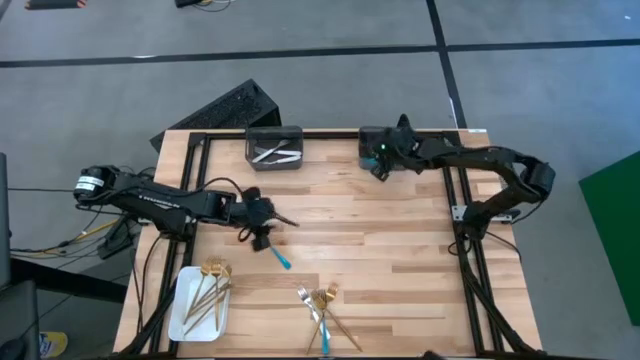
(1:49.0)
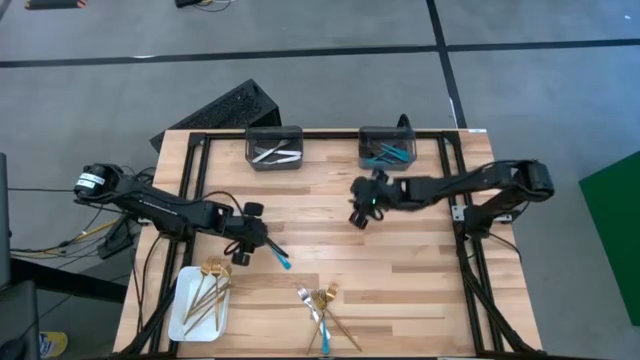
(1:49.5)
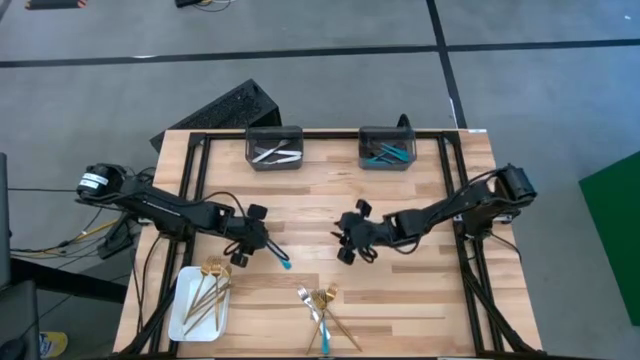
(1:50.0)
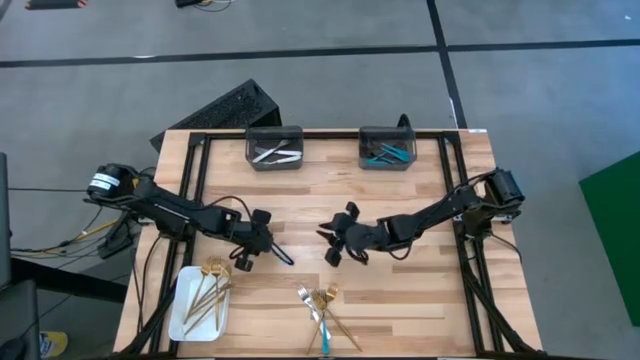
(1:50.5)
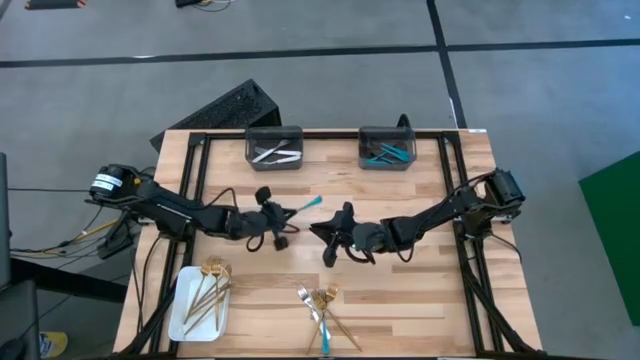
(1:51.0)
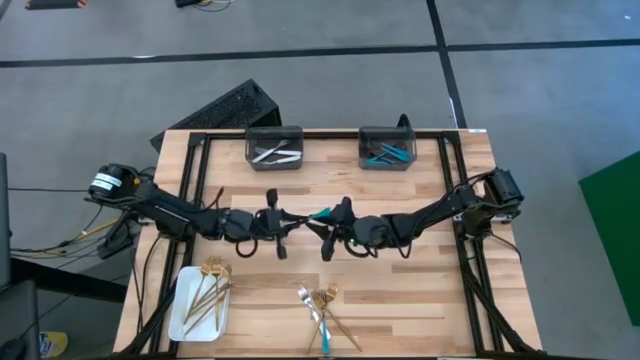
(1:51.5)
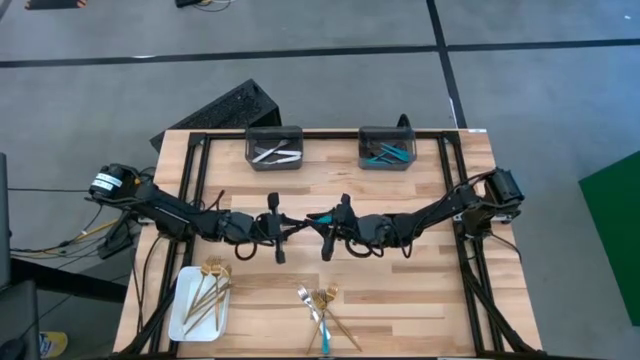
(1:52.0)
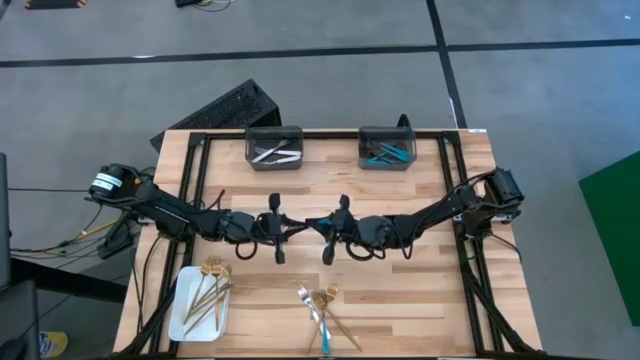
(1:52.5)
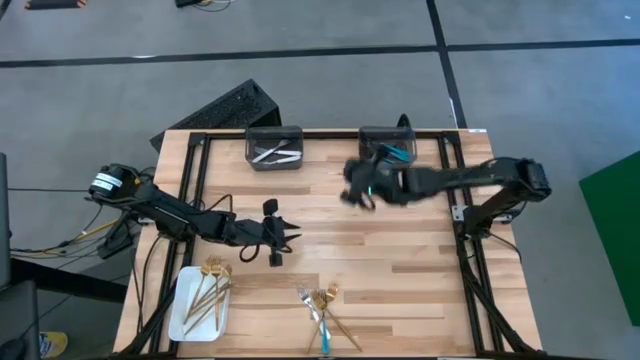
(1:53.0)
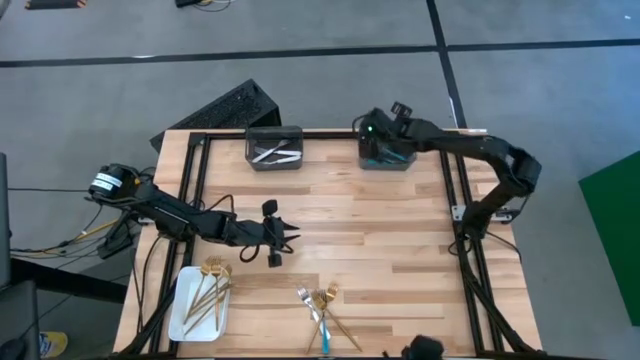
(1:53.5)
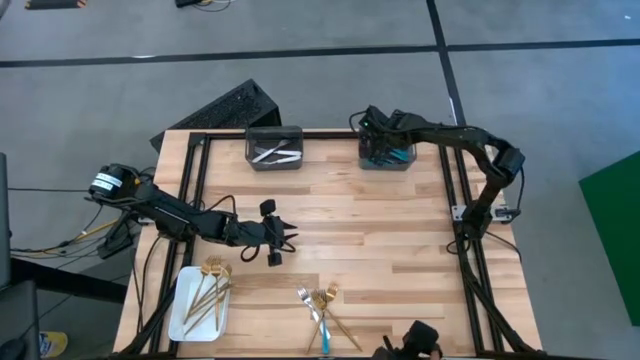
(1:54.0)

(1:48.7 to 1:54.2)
Task: Sort silverware by color (type)
Put the blue fork into the right black bin

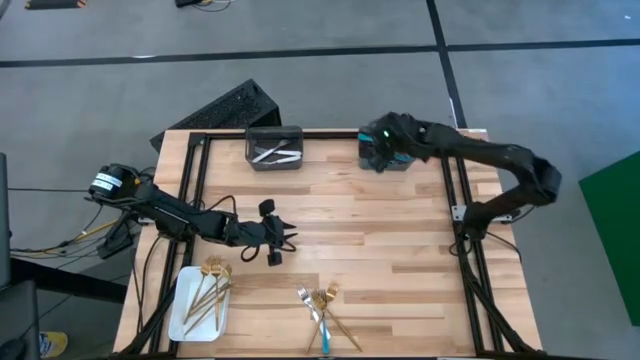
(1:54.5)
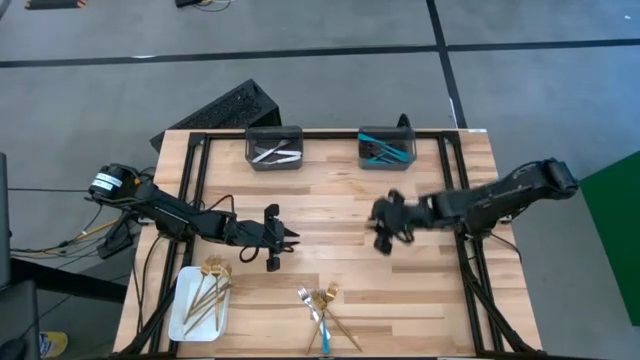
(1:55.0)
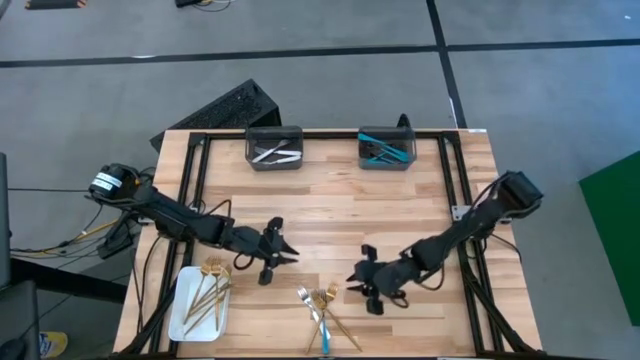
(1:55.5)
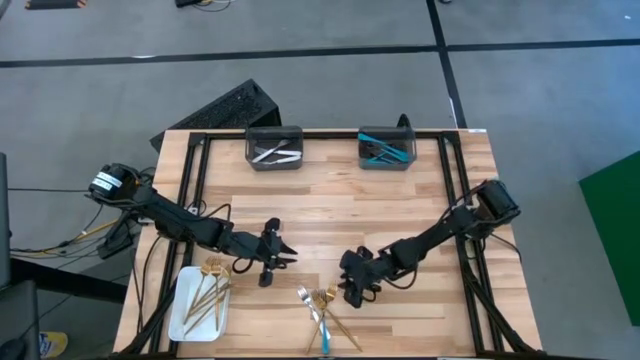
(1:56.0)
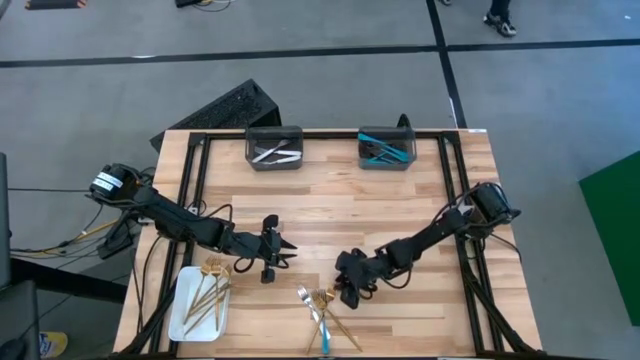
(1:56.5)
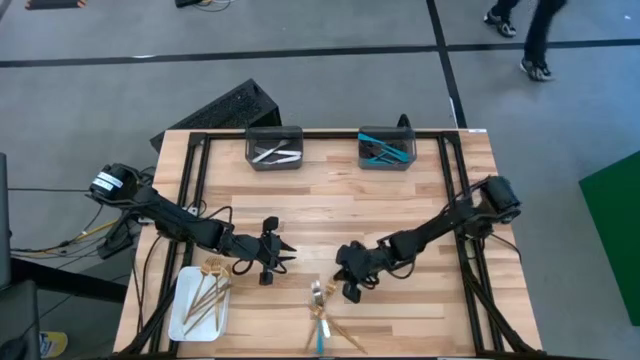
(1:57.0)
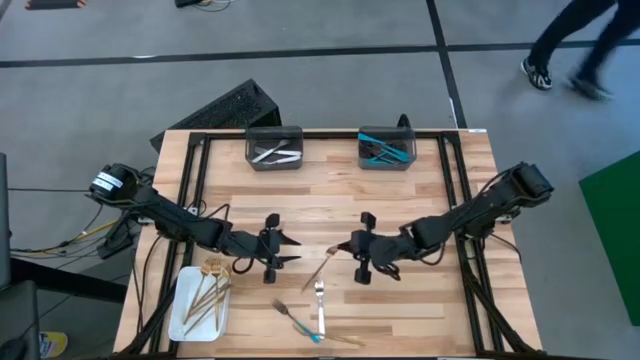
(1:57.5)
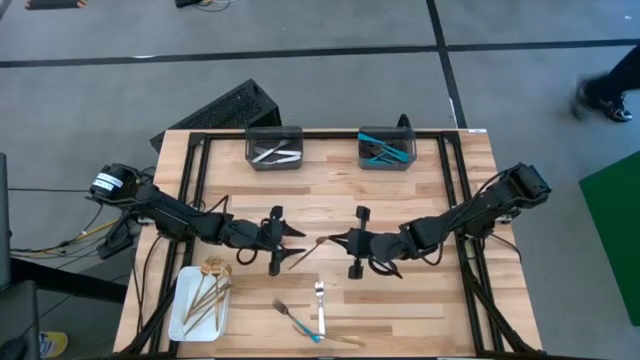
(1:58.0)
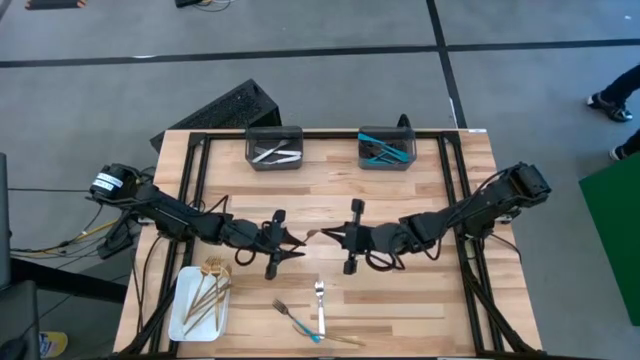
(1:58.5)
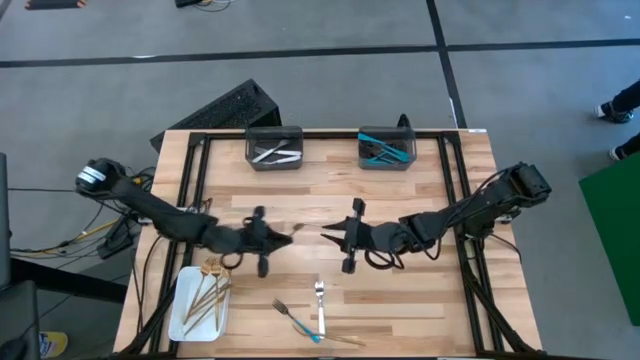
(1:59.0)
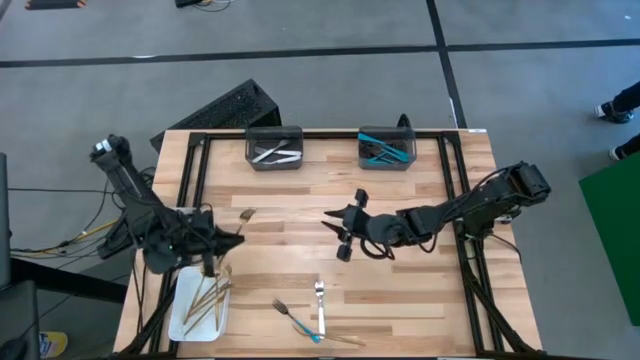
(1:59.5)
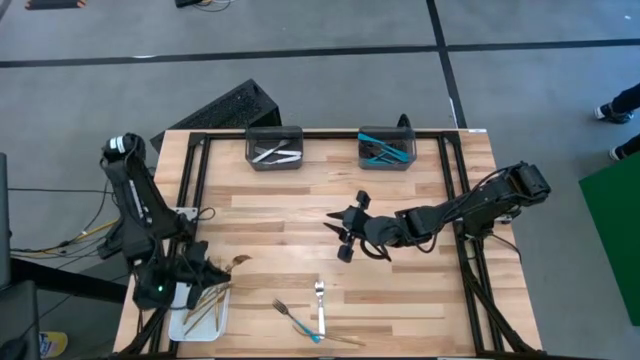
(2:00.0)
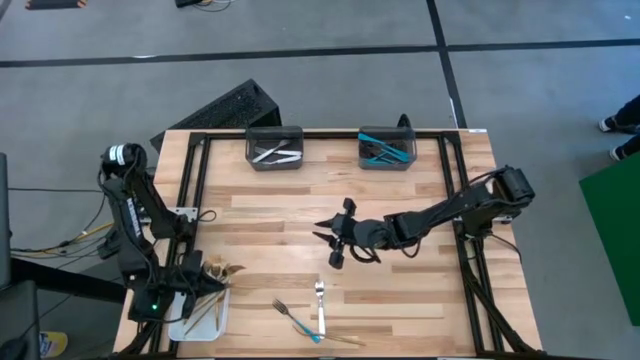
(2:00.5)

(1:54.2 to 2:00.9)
Put the gold fork into the white bin

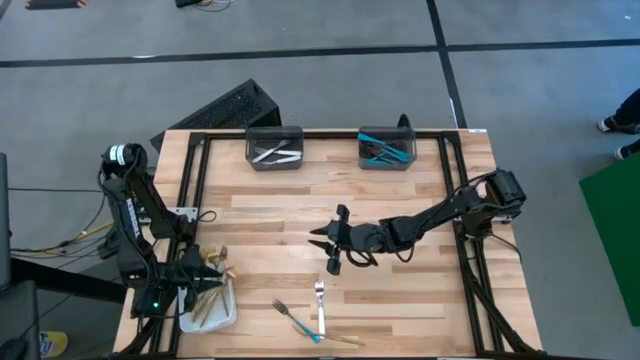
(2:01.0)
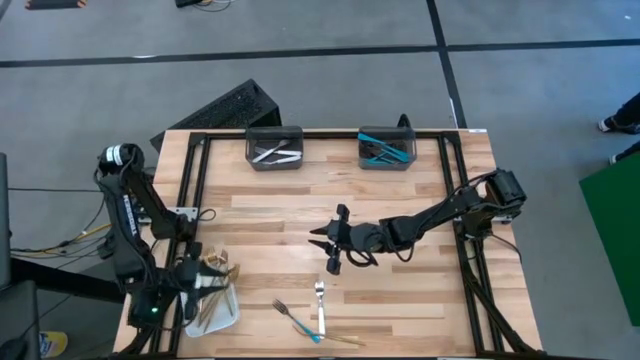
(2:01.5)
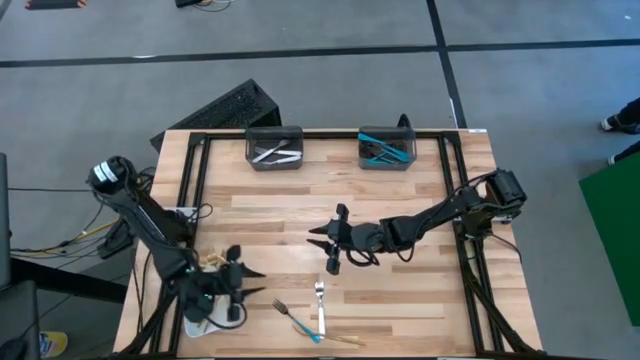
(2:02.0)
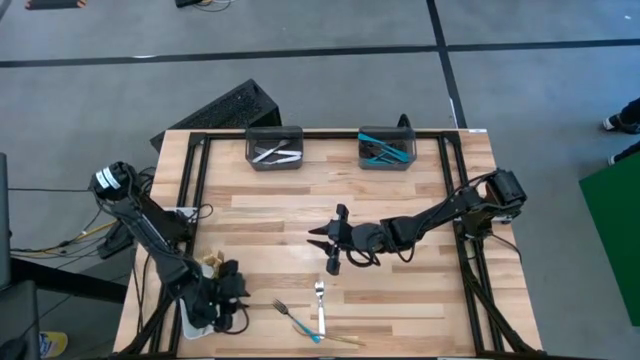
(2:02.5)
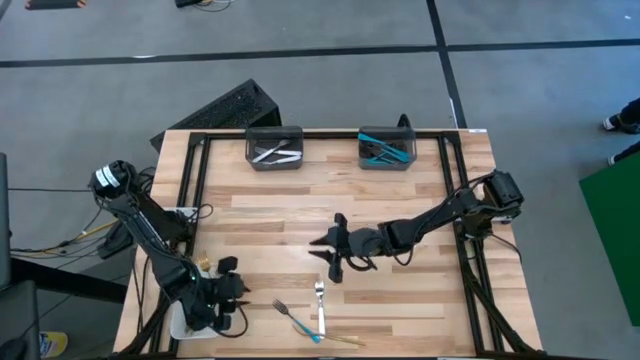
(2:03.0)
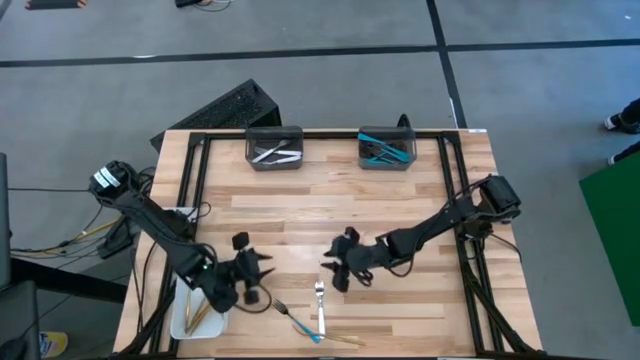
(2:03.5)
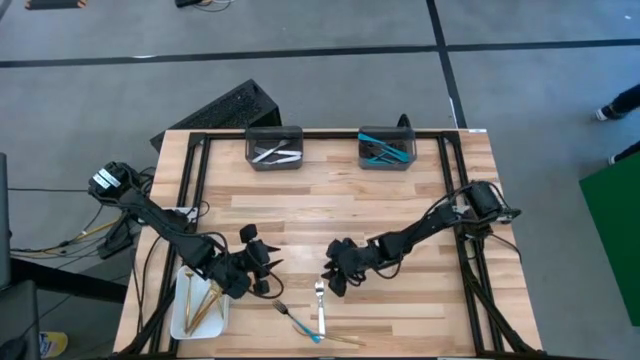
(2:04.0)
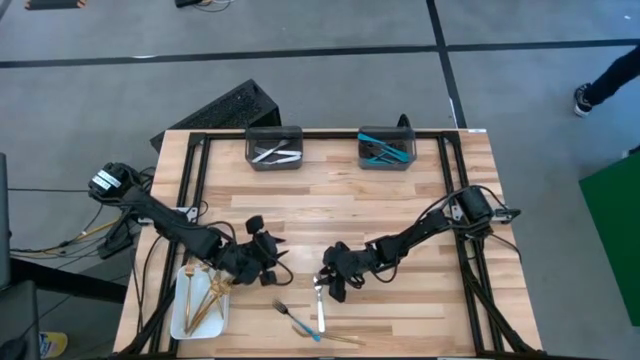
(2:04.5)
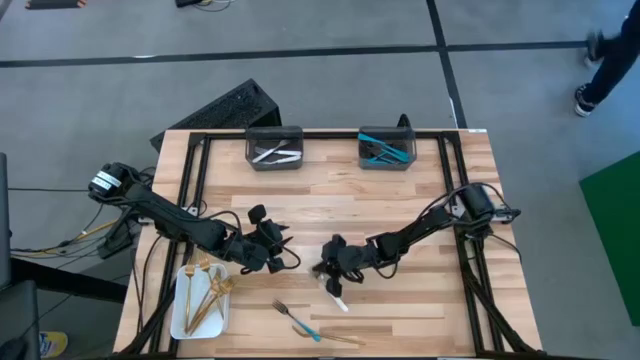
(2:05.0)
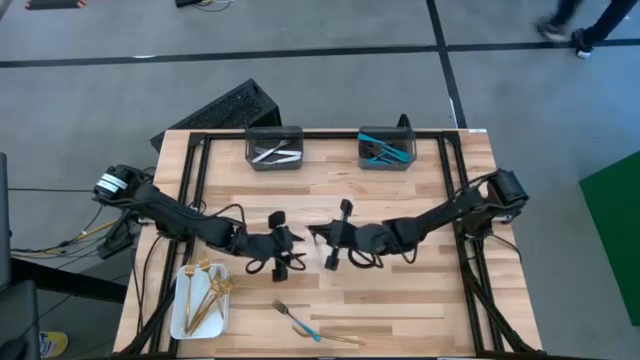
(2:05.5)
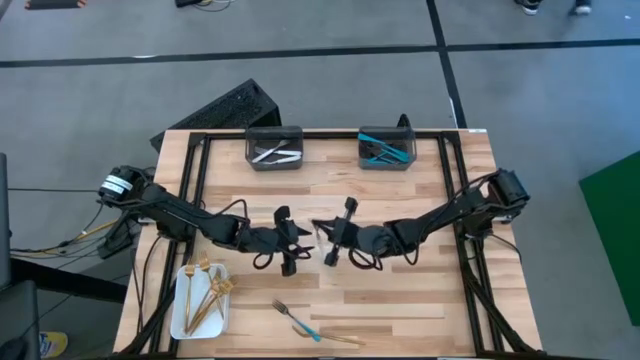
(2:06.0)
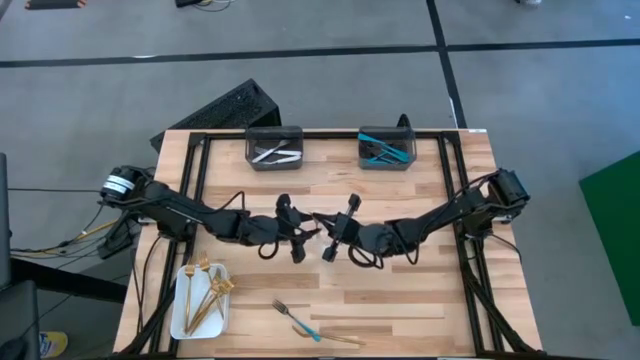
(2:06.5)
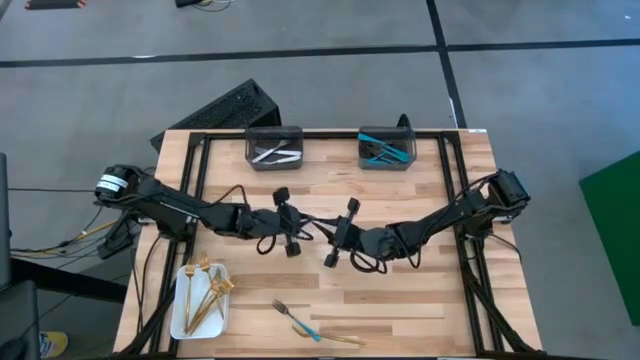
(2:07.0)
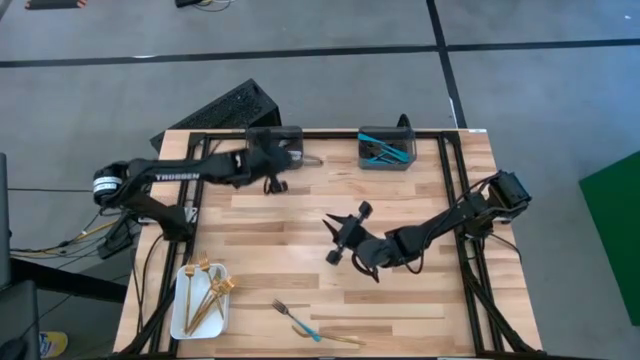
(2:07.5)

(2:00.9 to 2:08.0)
Put the white fork into the left black bin

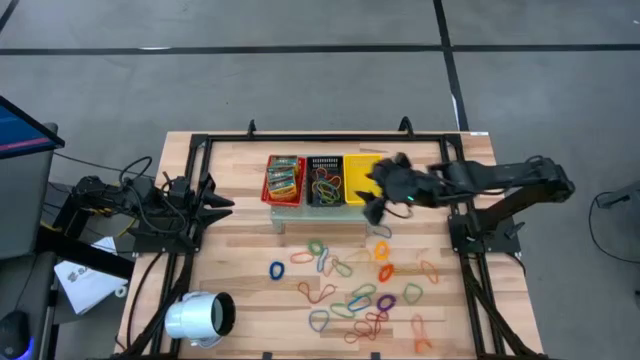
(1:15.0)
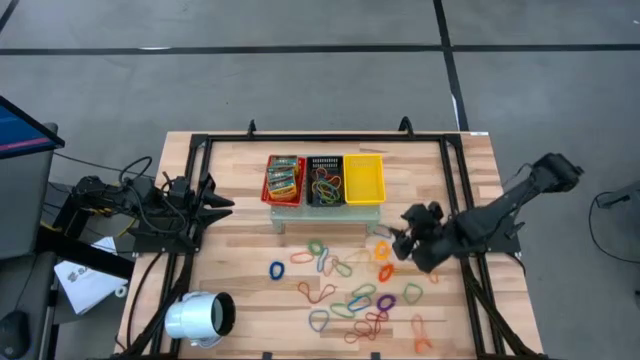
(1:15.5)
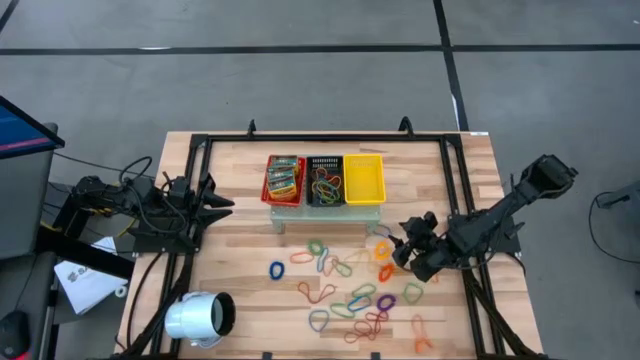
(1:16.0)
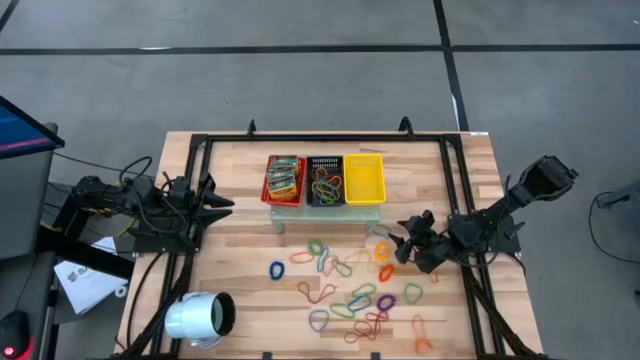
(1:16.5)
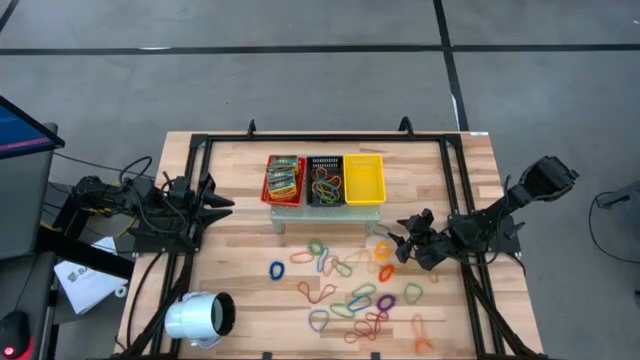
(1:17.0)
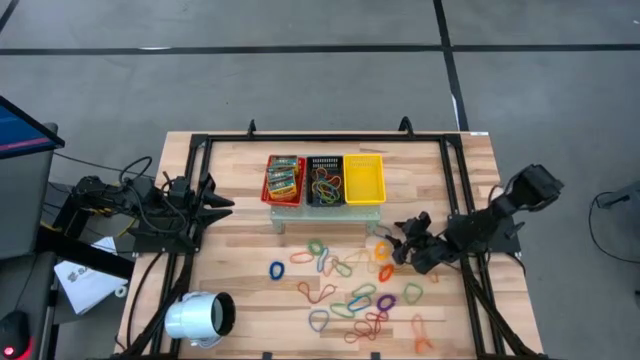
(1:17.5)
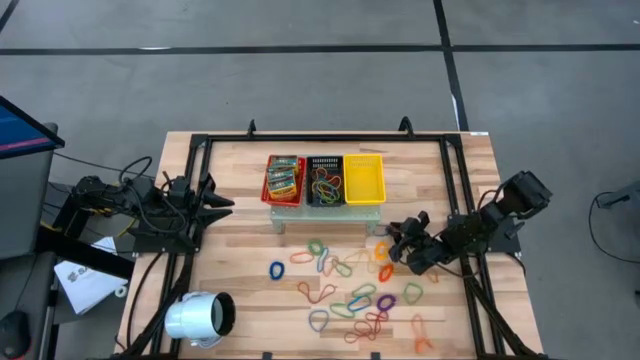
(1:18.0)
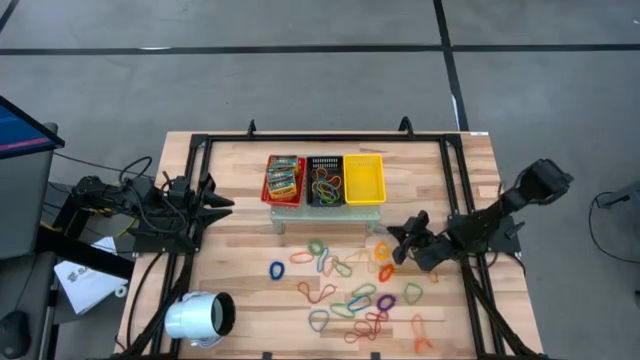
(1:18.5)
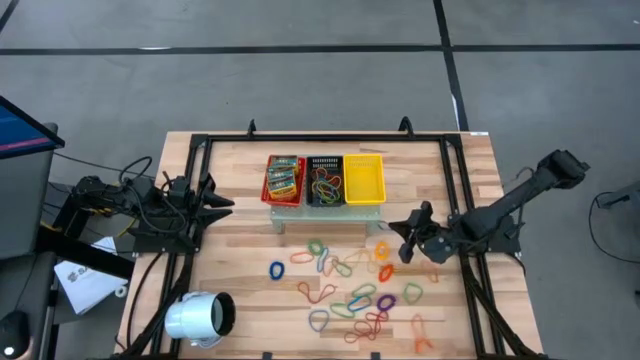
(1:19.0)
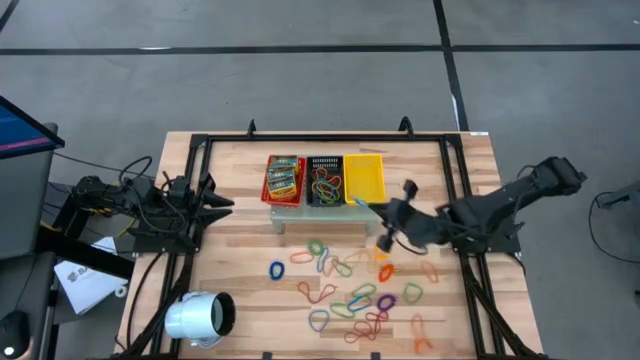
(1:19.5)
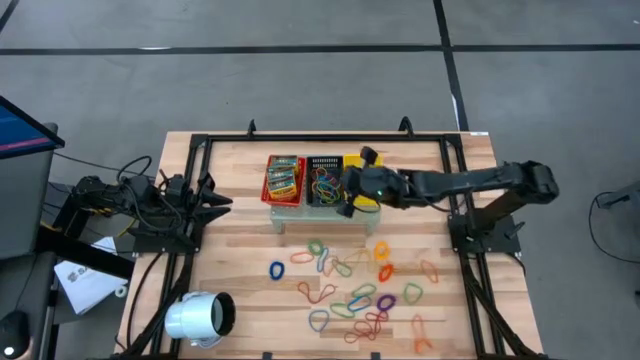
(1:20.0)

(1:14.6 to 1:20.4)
Task: Pick & Place Office Desk Supplies
Put the blue rubber band into the black bin on the shelf
